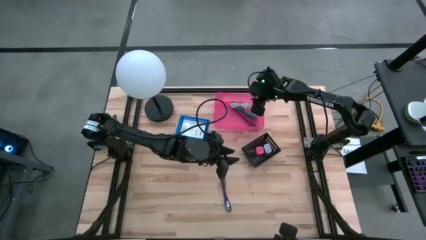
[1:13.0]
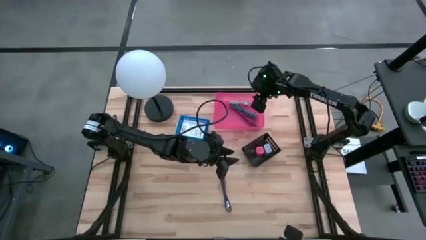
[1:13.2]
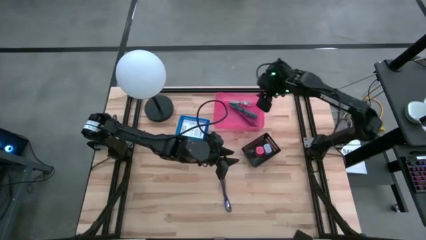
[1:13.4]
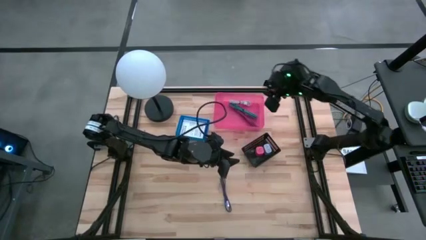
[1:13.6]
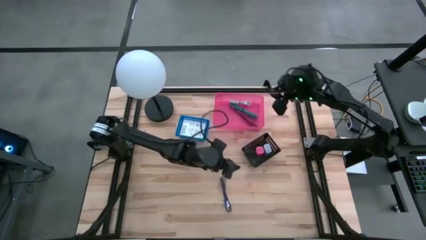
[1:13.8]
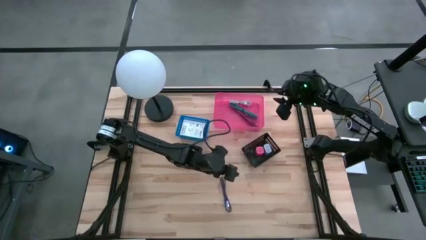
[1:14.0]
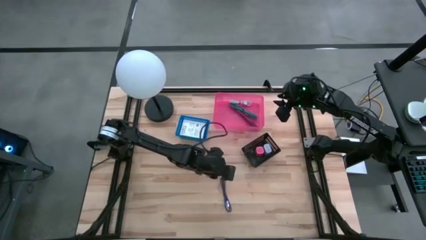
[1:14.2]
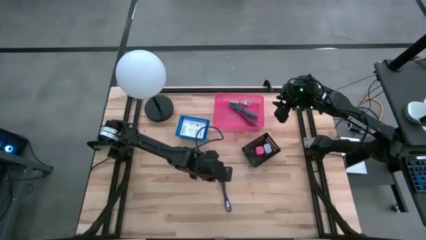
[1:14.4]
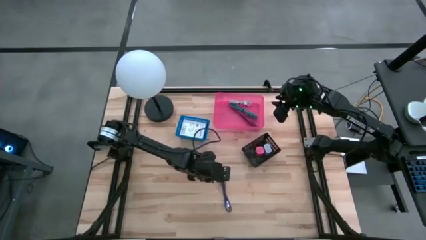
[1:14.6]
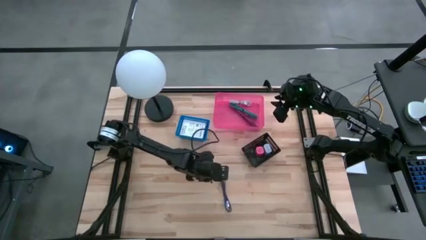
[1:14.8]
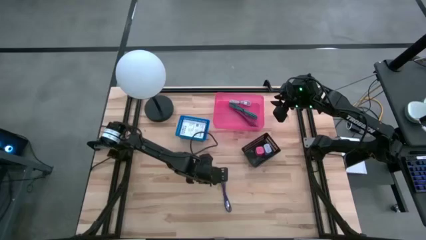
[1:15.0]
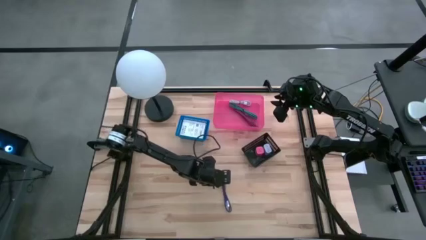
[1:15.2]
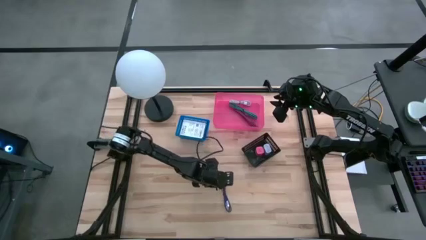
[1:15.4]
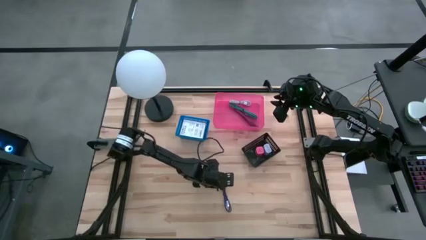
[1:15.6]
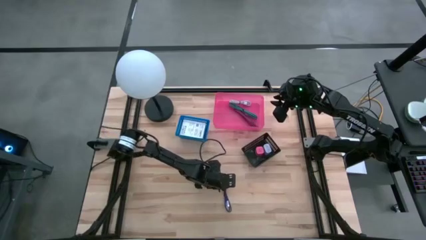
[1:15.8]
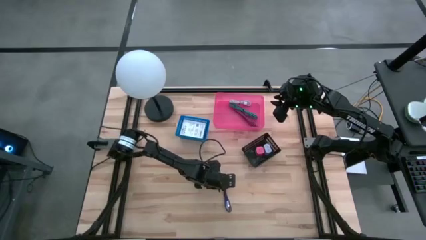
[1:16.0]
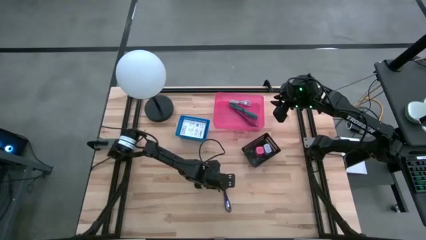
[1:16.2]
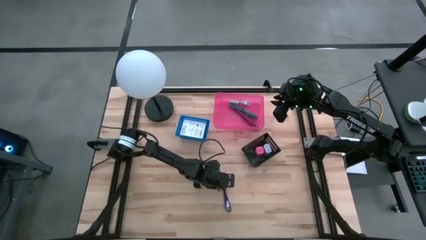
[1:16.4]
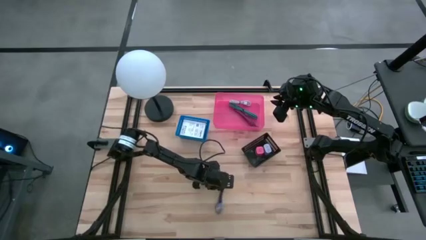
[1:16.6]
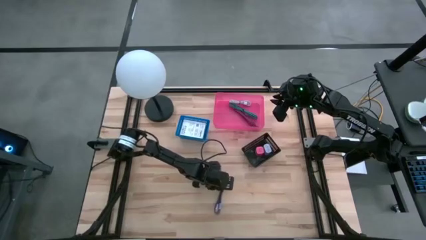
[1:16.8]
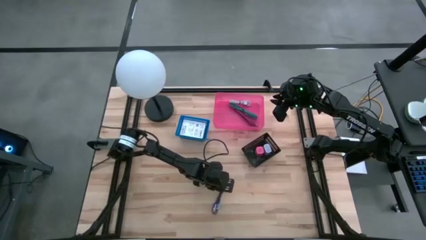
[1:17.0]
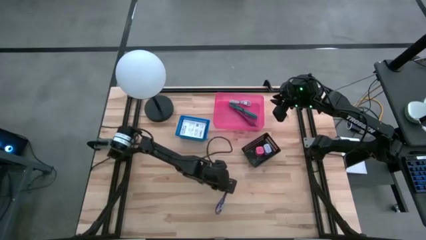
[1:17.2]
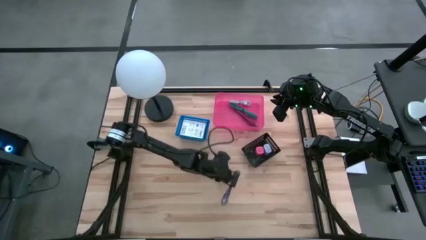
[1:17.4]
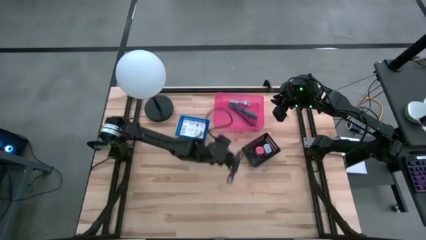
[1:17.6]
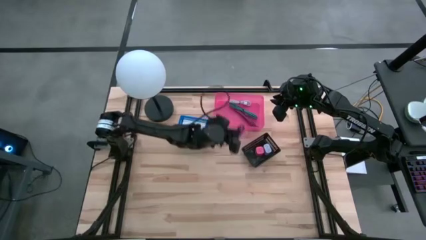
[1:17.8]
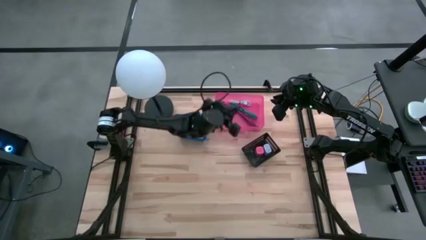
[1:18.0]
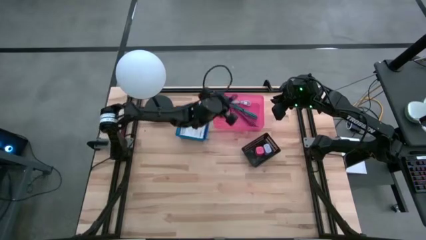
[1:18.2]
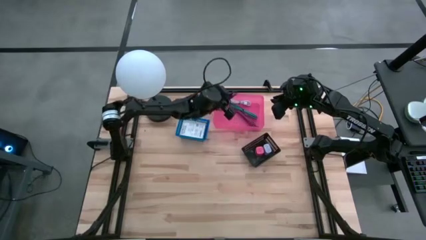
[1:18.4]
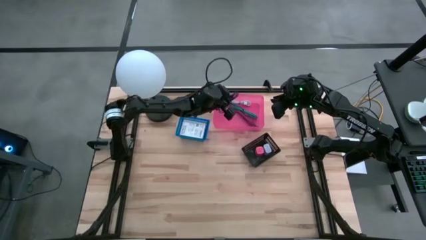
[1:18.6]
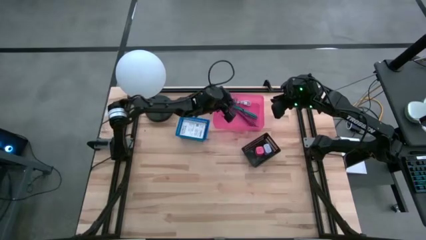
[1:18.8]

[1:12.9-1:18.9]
Task: Pick and place items into bin
Put the purple charger cable into the pink bin

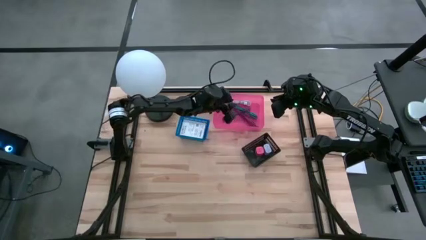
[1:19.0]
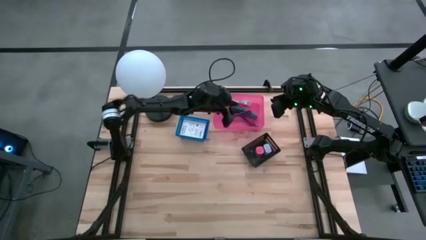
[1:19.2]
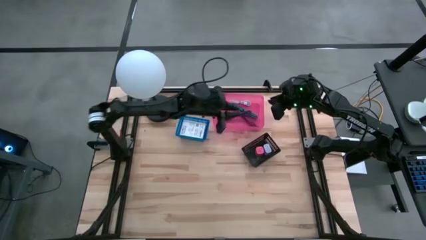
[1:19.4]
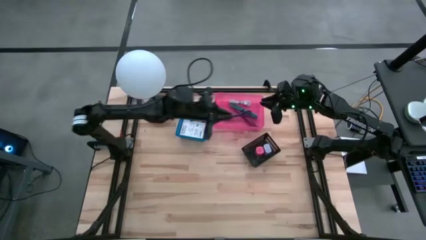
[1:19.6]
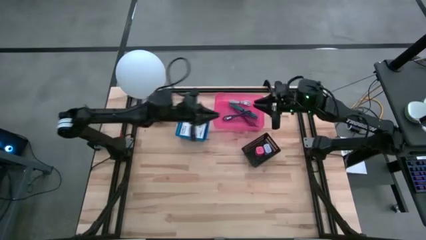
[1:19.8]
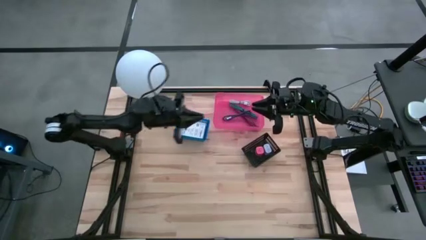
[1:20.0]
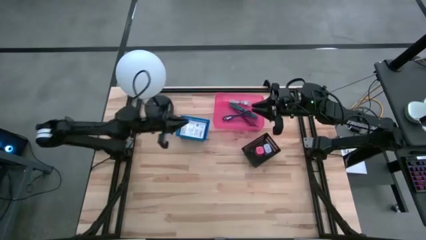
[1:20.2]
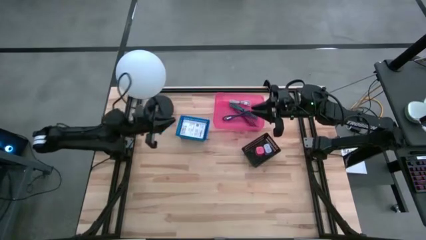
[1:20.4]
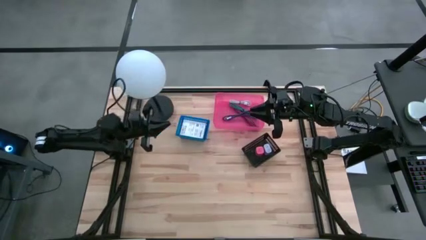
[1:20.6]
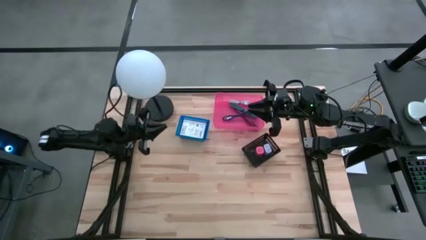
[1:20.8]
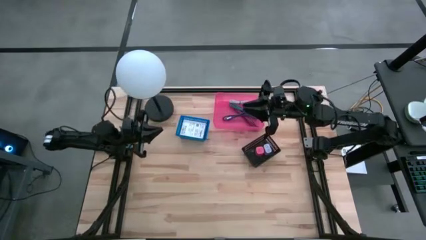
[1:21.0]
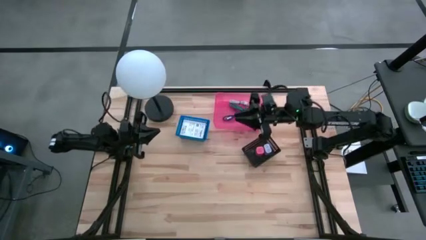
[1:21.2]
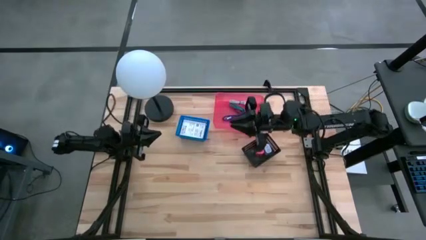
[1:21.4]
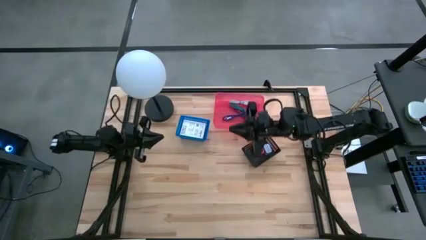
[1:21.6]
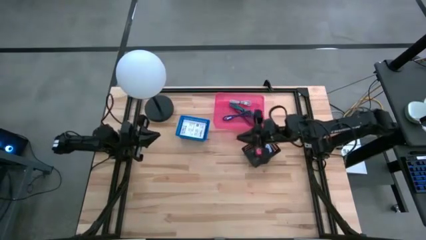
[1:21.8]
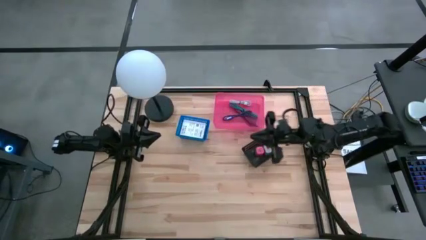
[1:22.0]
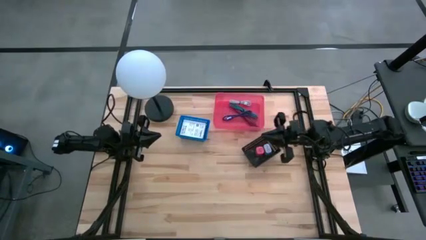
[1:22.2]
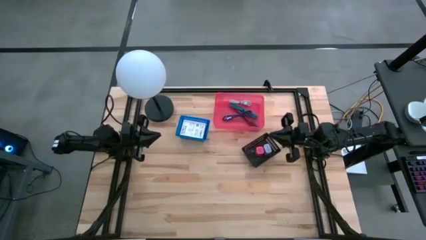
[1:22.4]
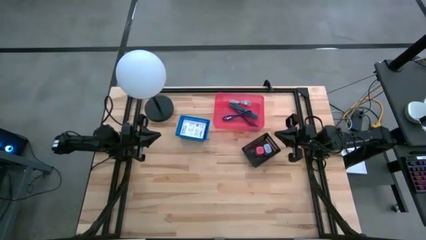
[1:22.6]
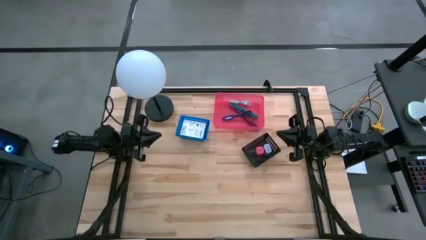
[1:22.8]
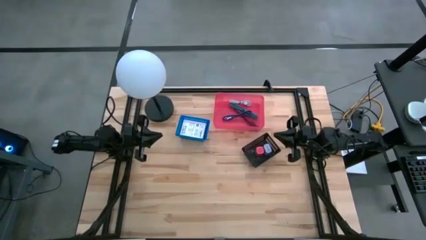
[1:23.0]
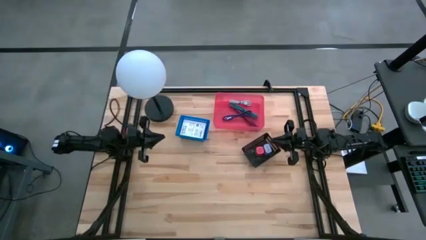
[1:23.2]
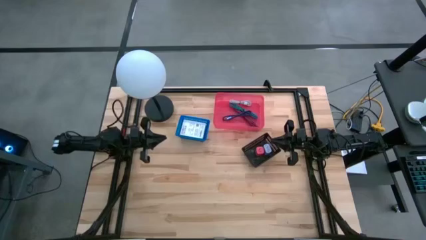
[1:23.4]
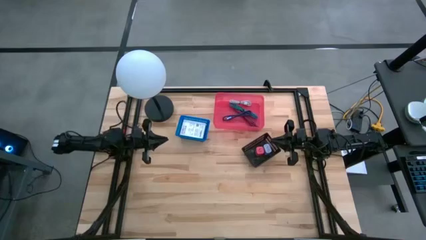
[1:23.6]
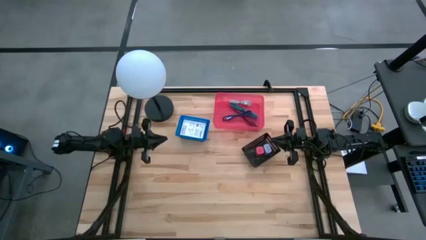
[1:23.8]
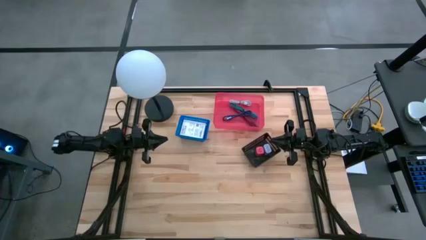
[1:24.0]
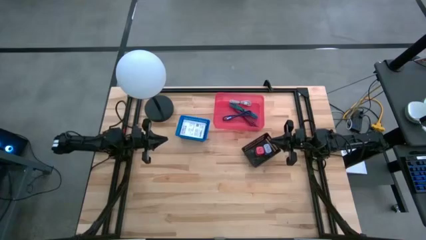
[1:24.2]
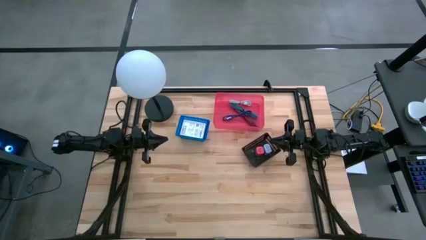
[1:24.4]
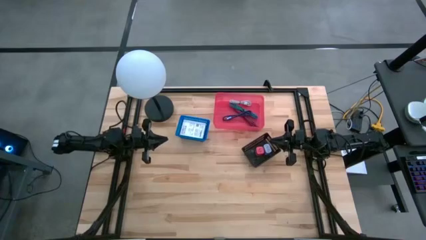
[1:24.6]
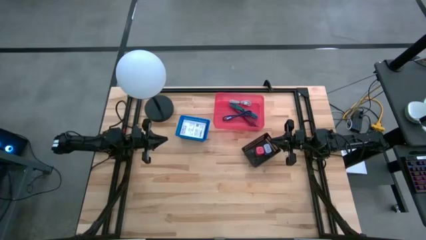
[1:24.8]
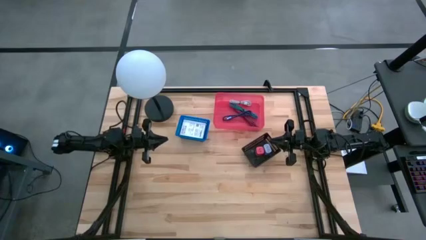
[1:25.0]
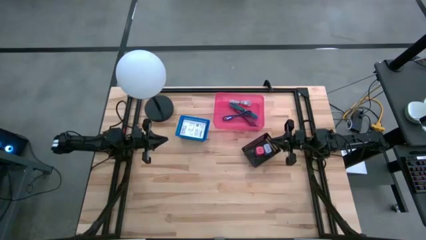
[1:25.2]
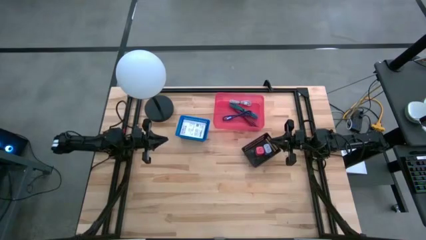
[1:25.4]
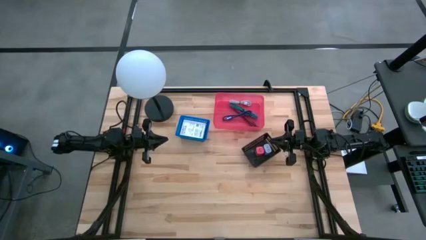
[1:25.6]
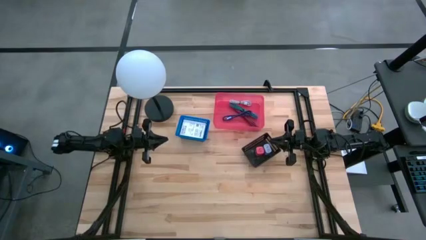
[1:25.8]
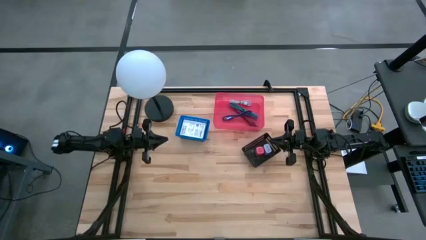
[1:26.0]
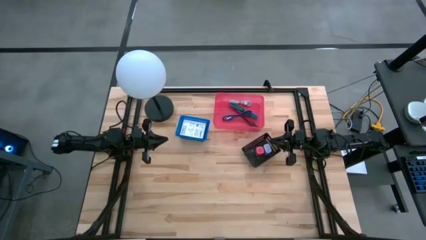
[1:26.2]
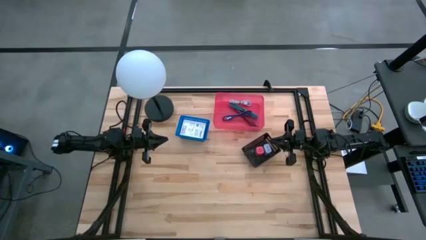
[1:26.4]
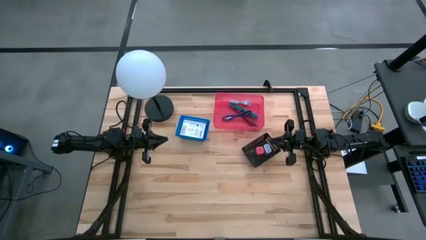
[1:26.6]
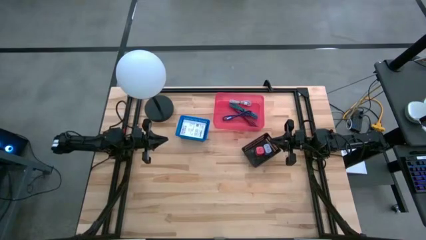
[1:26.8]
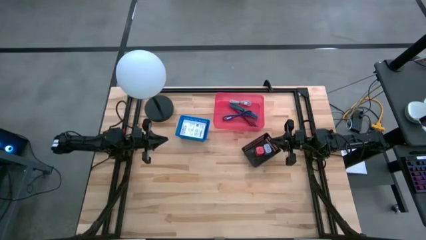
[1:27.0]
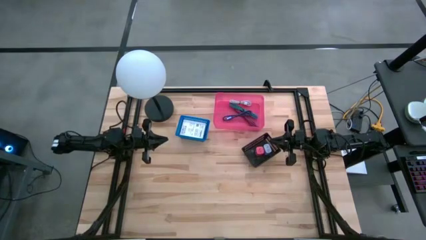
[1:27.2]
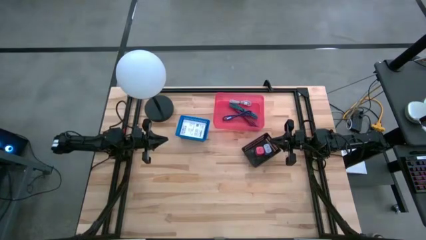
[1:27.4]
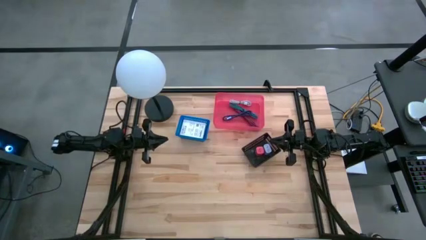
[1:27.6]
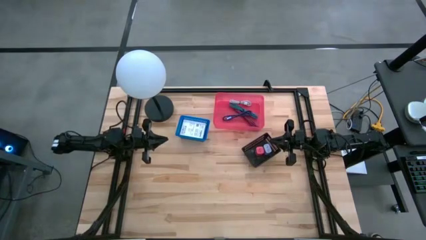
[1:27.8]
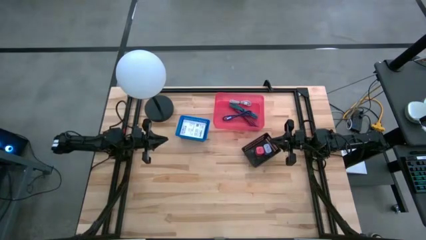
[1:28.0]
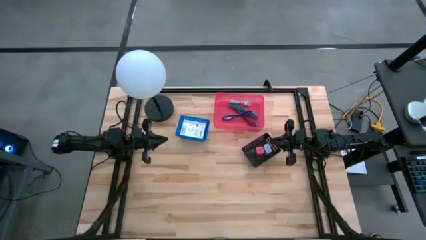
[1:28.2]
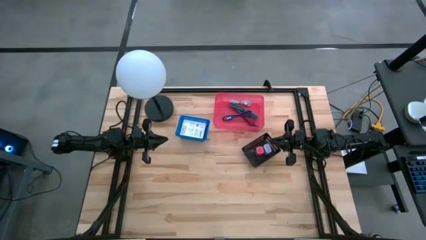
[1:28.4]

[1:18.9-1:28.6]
Return to Home Position
